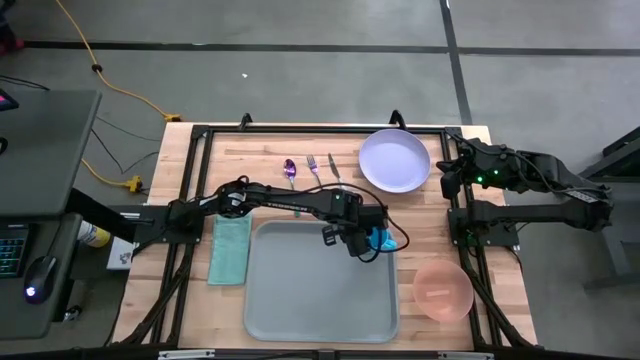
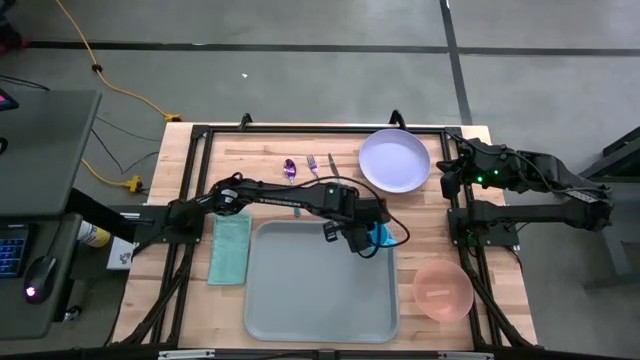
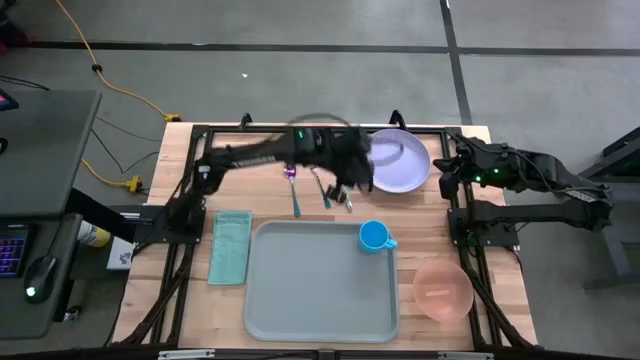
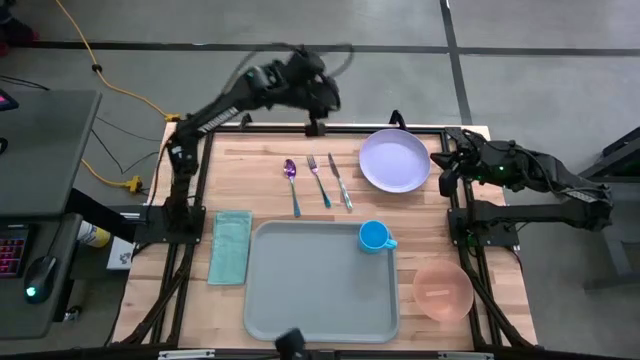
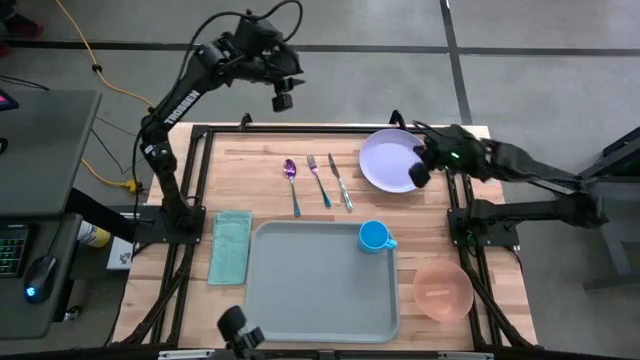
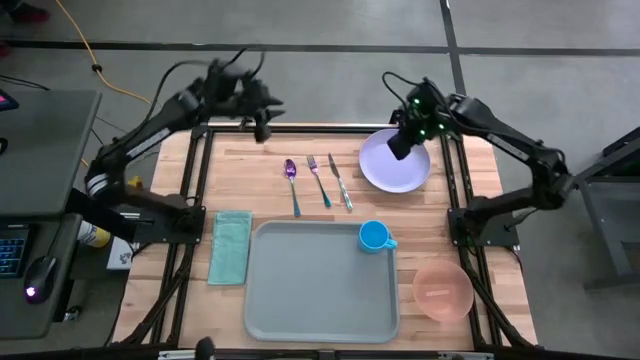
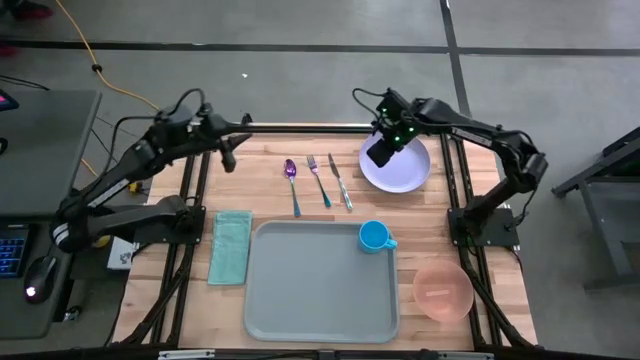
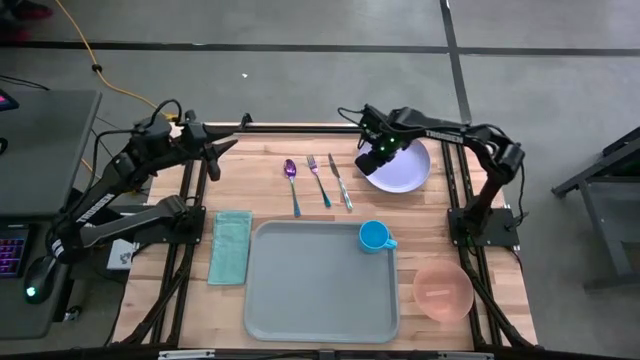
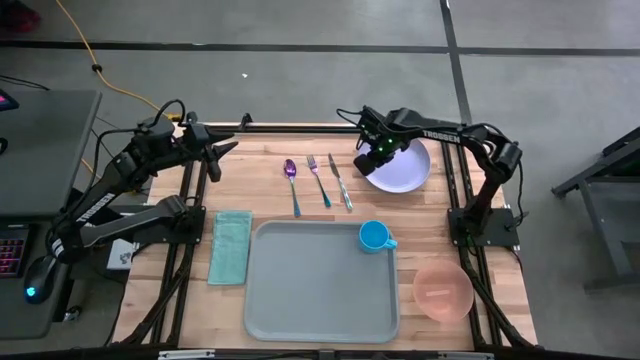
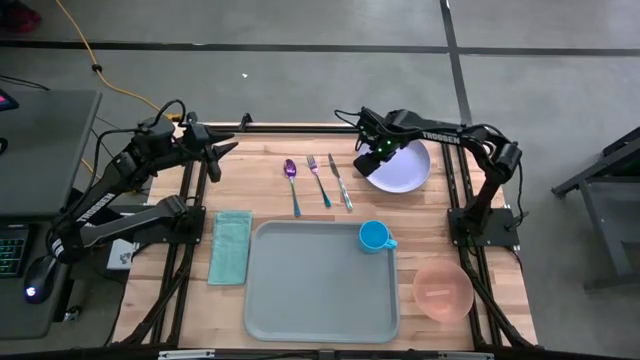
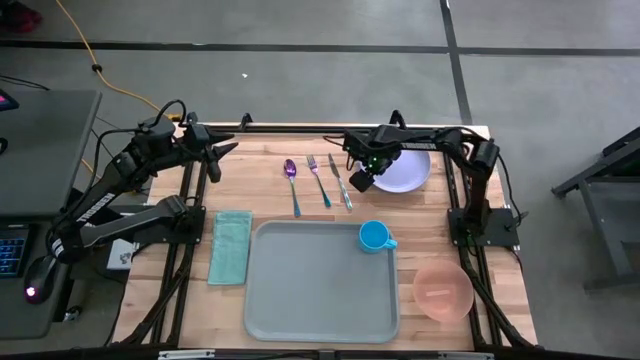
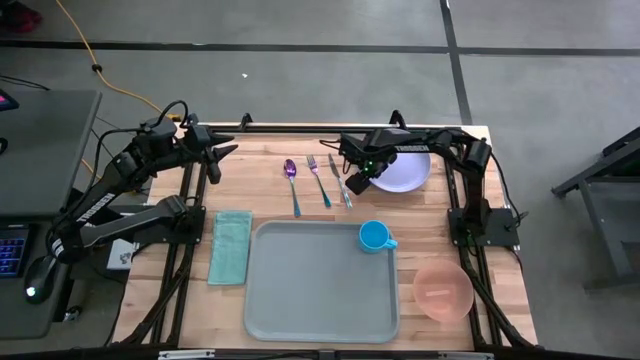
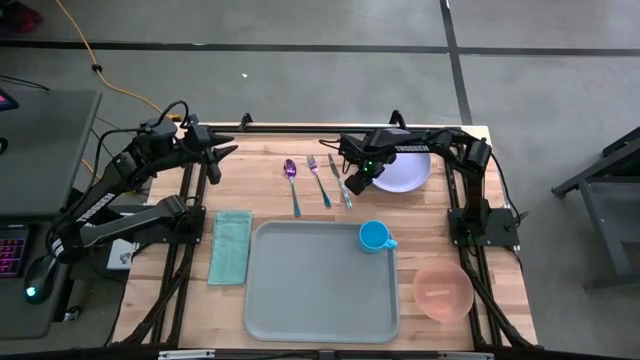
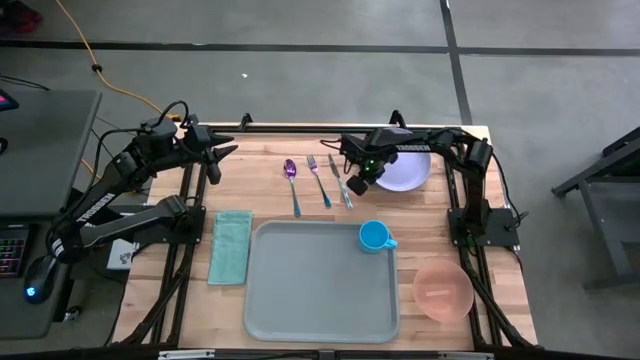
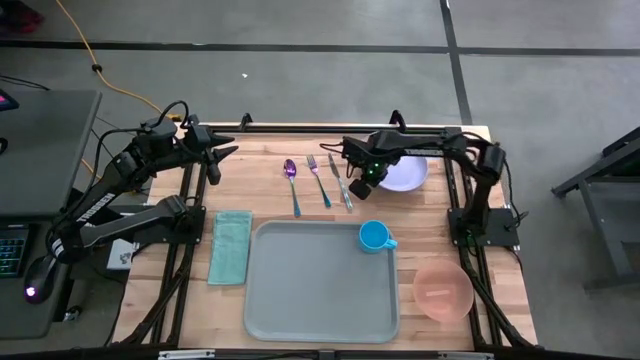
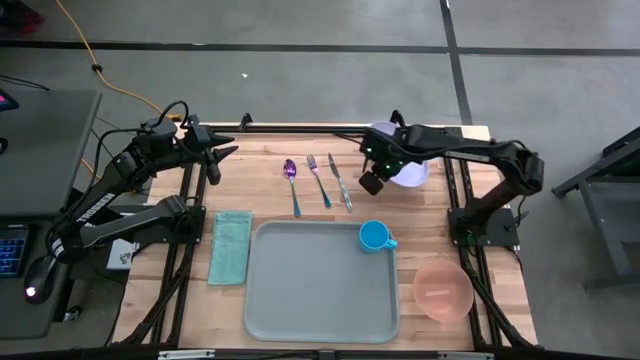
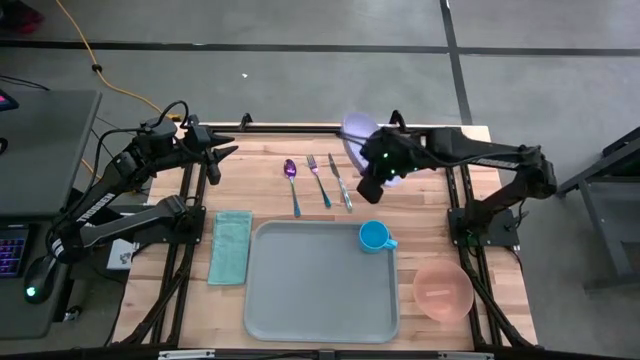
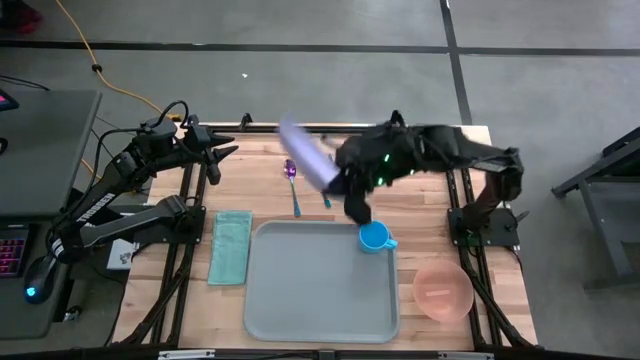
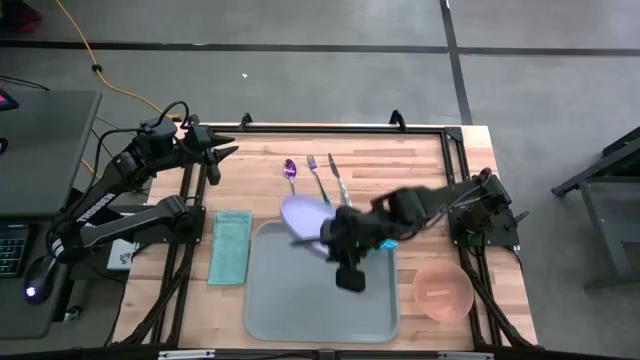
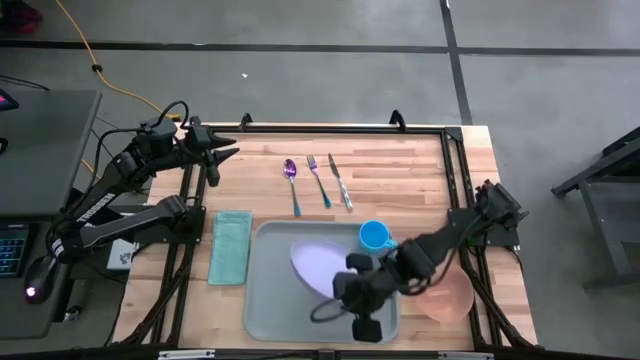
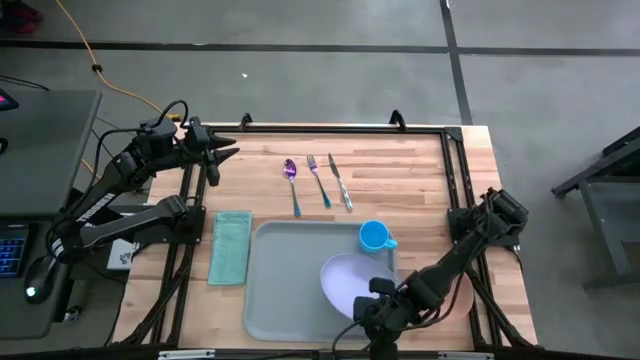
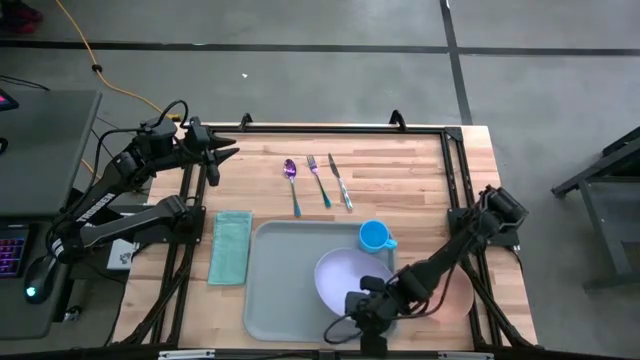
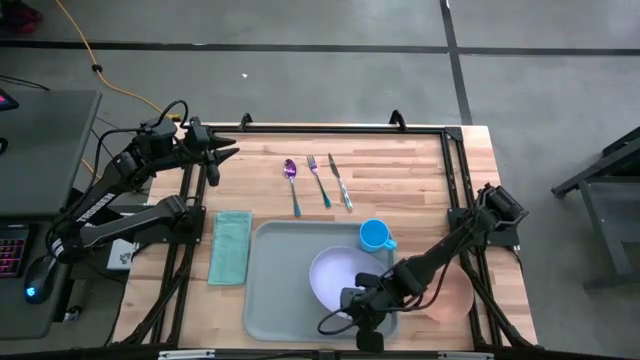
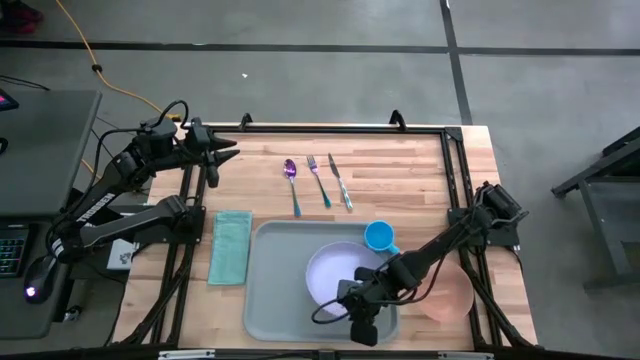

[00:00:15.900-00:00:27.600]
Task: Set up tray
Put the violet plate on the gray tray to the bottom left of the blue cup

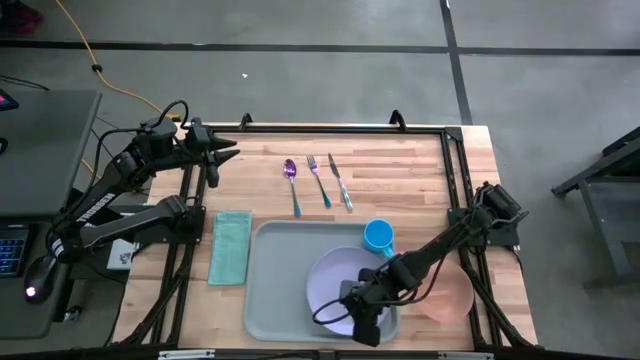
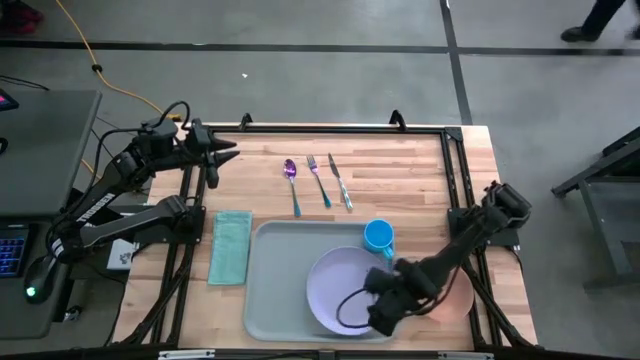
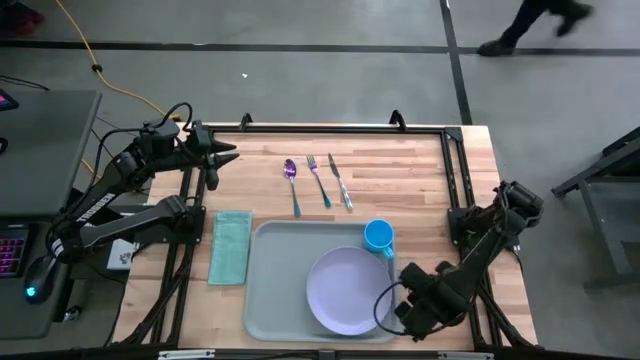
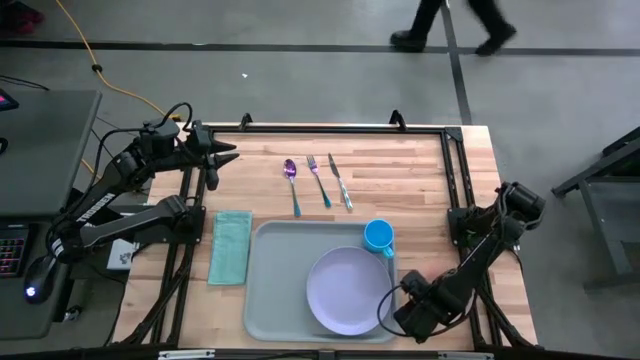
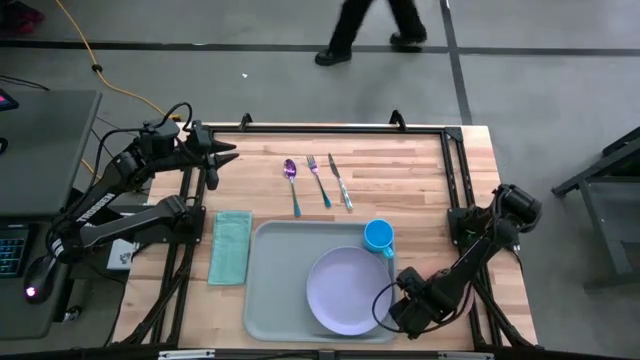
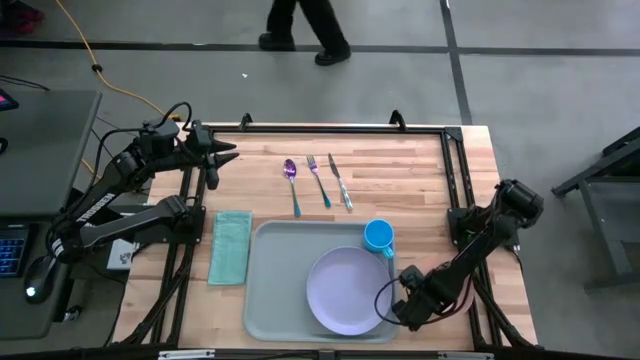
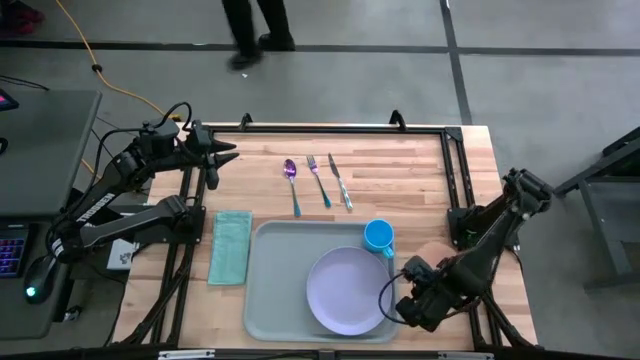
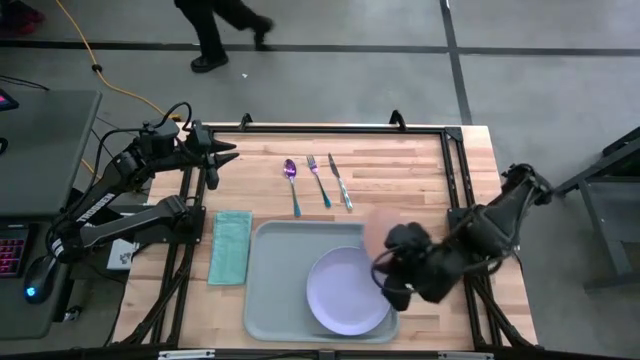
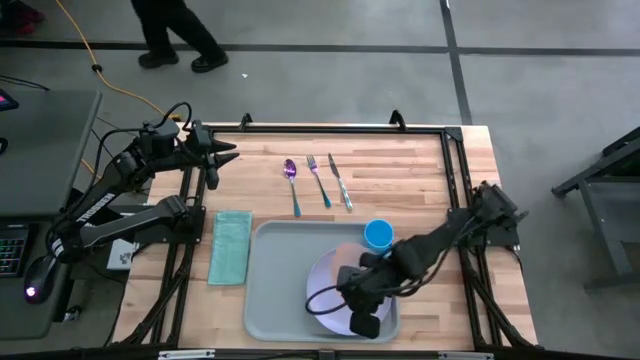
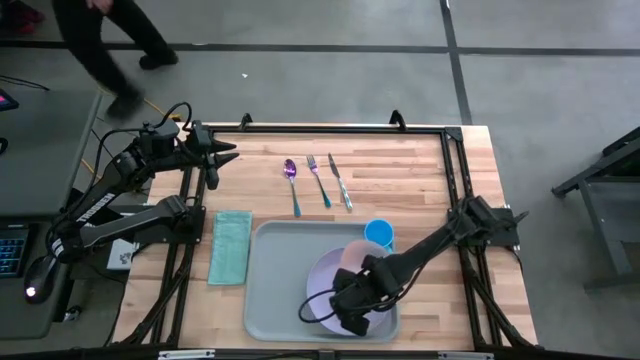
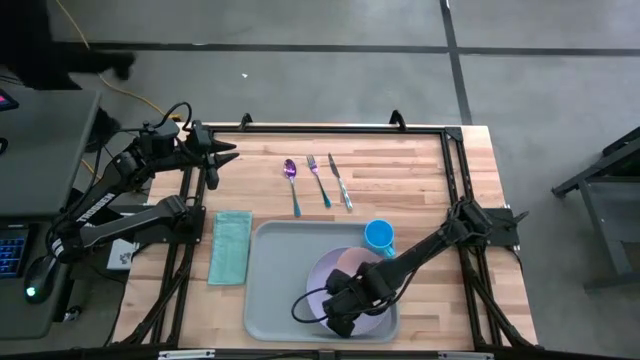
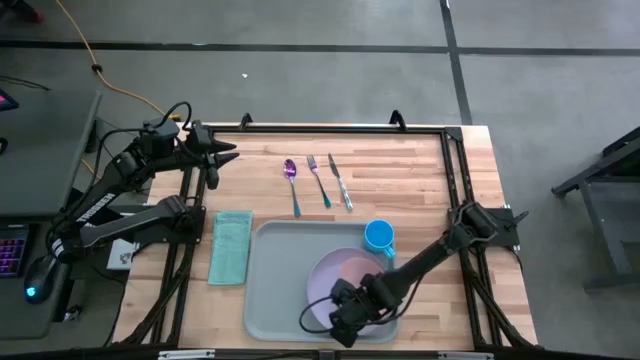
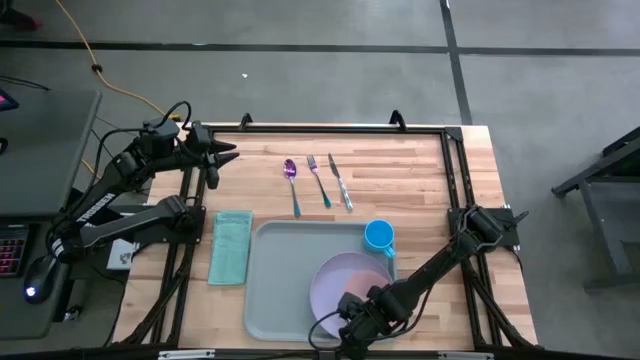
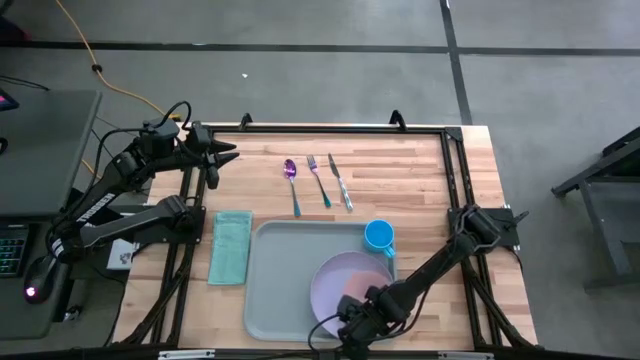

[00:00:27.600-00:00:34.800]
Put the orange bowl on the violet plate

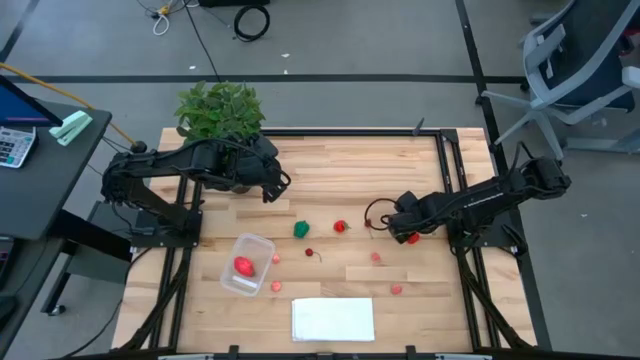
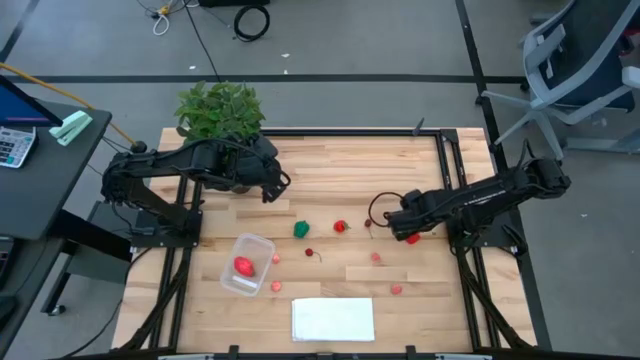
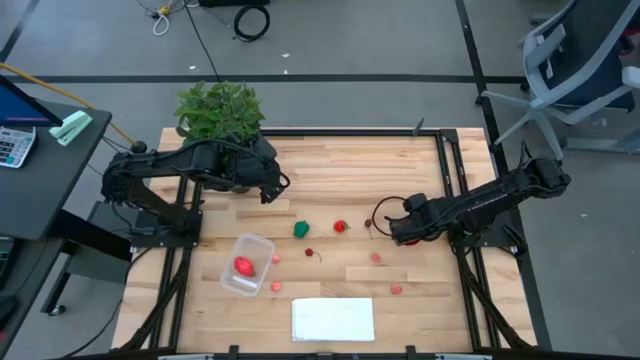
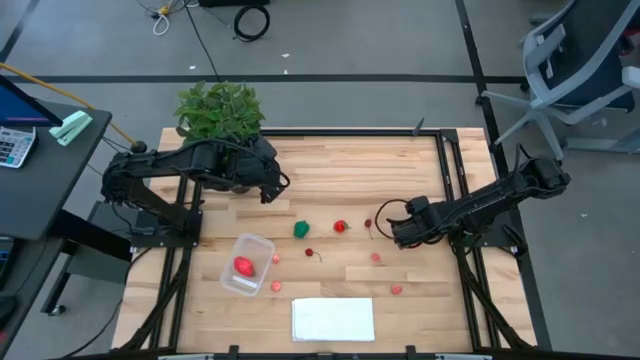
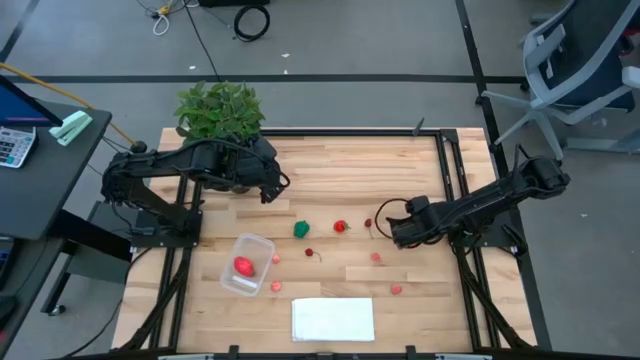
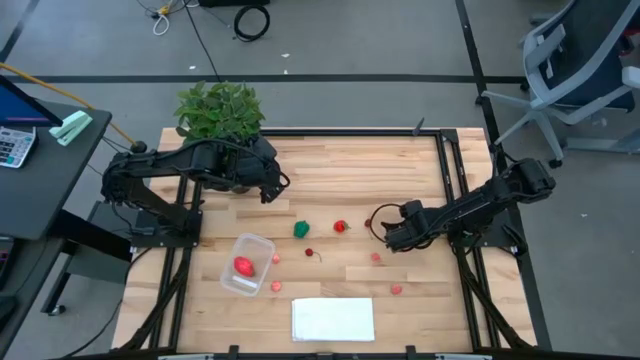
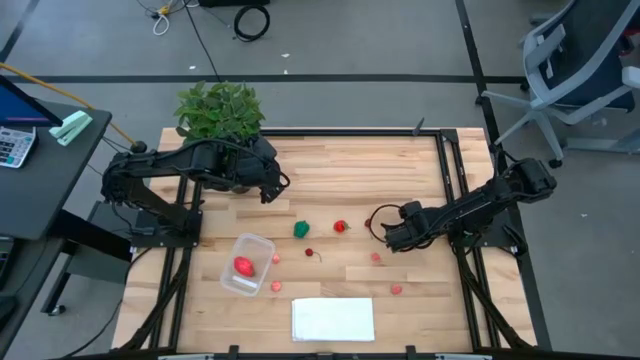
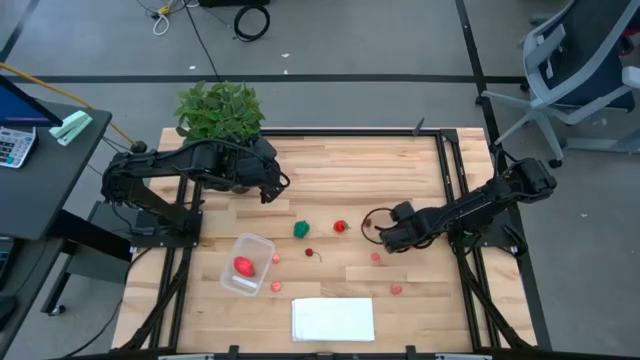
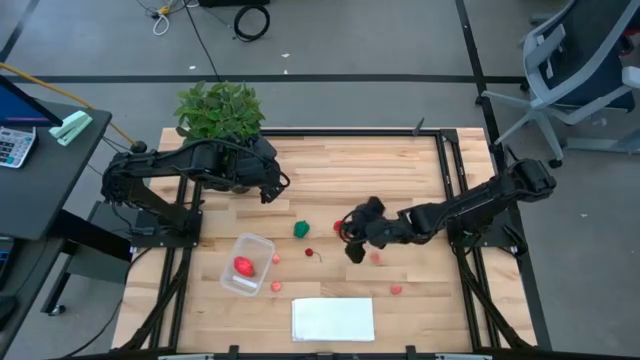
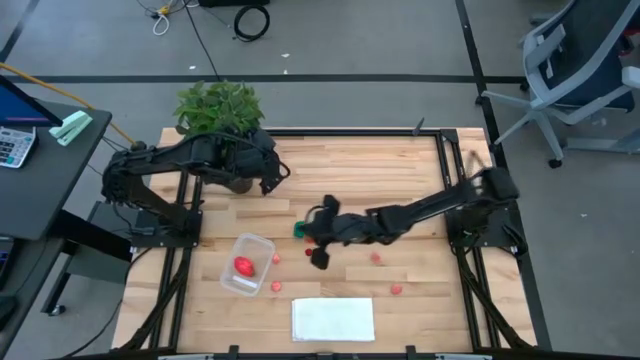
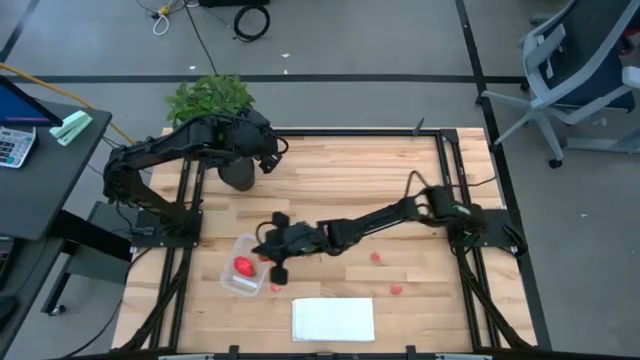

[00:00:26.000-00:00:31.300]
Task: Pick and placing Produce into tupperware
Put the red strawberry into the transparent bin
